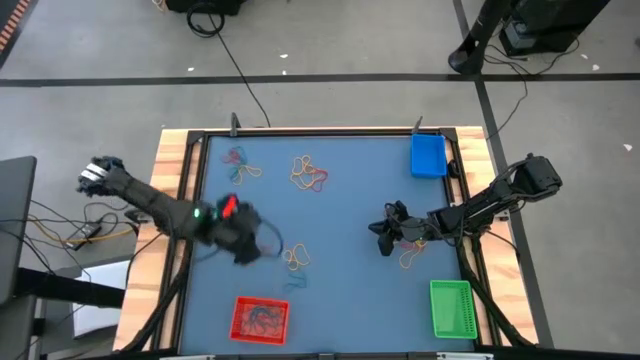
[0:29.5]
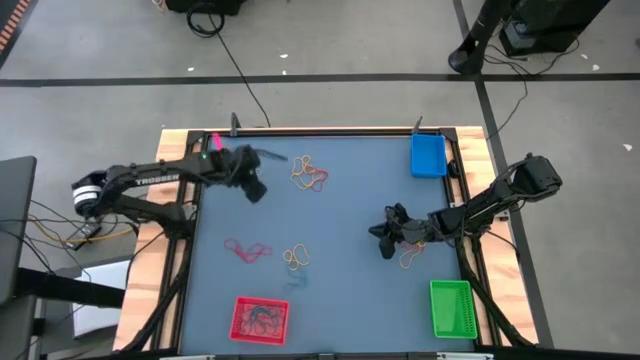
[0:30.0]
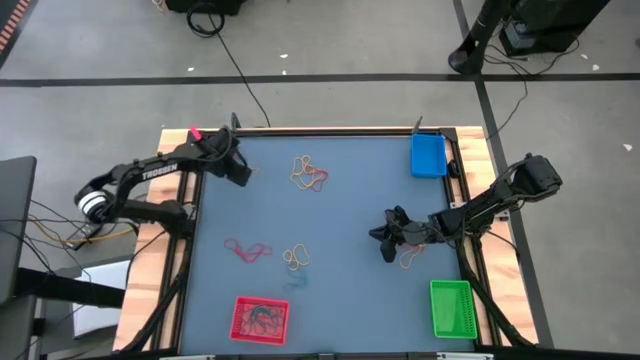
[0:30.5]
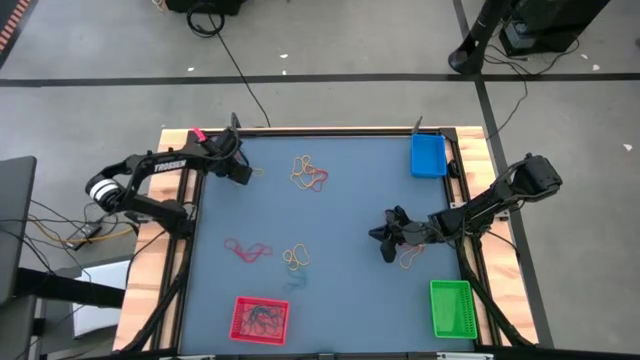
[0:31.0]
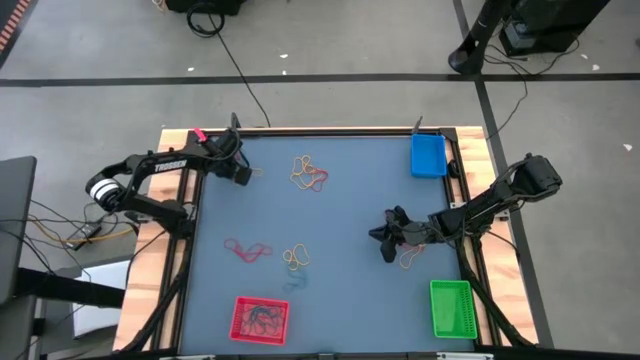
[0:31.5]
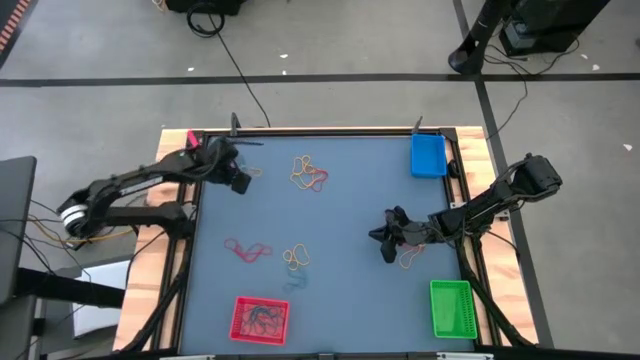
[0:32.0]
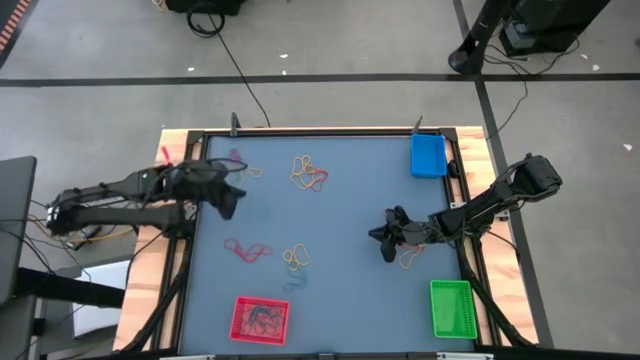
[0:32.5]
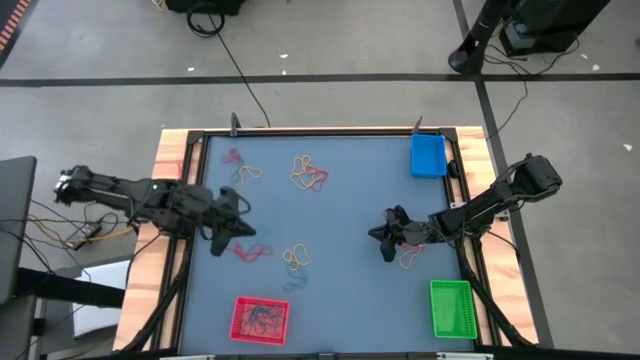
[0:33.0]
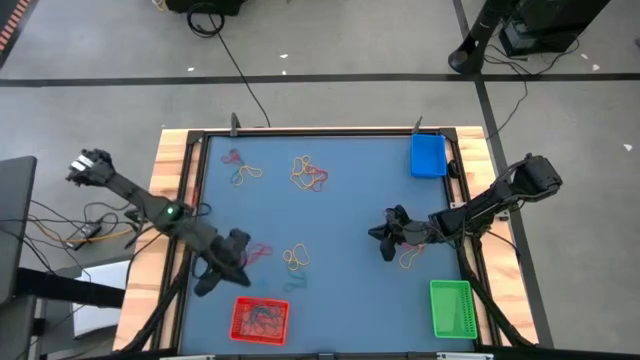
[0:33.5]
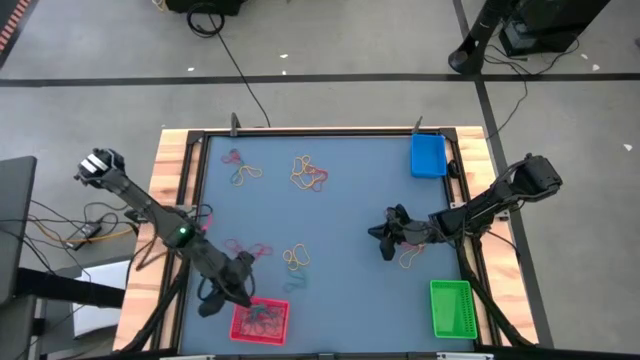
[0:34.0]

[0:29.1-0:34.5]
Task: Sort rubber bands into baskets
Put the blue rubber band into the red bin

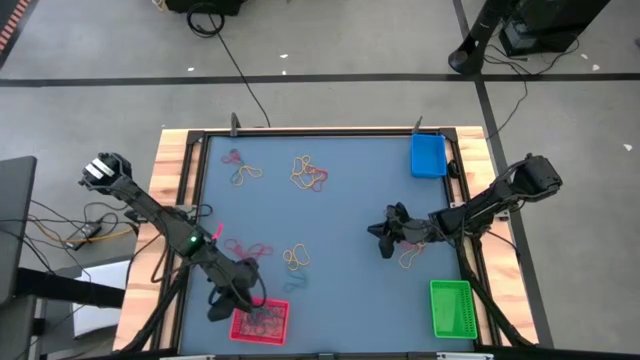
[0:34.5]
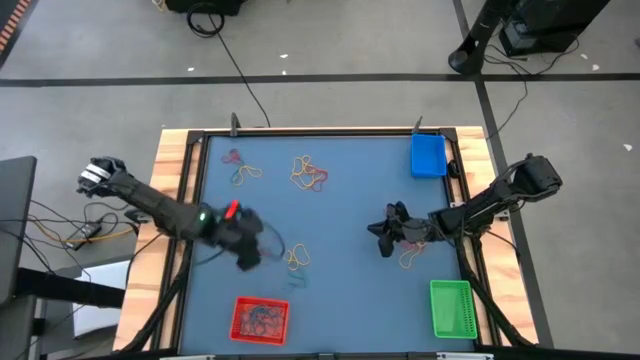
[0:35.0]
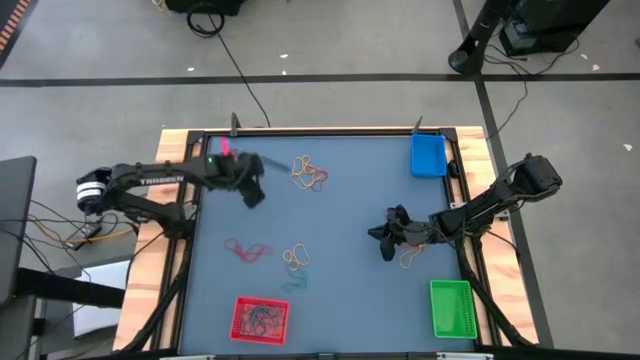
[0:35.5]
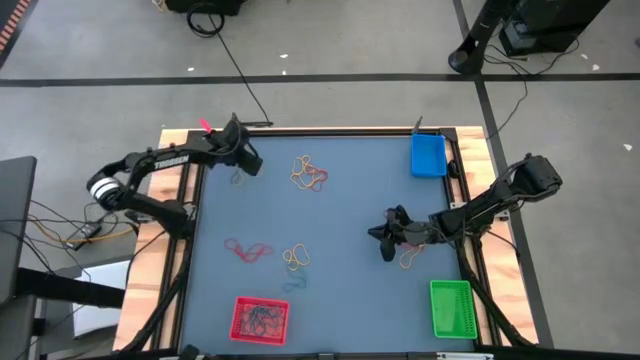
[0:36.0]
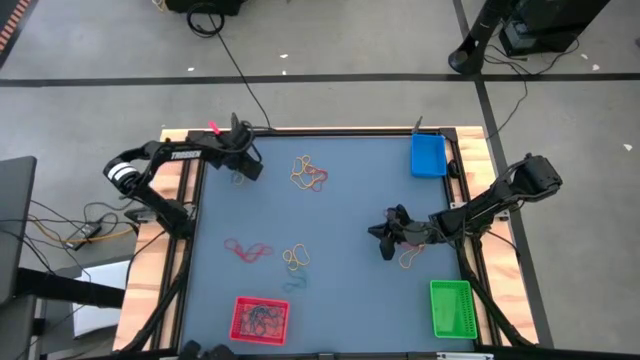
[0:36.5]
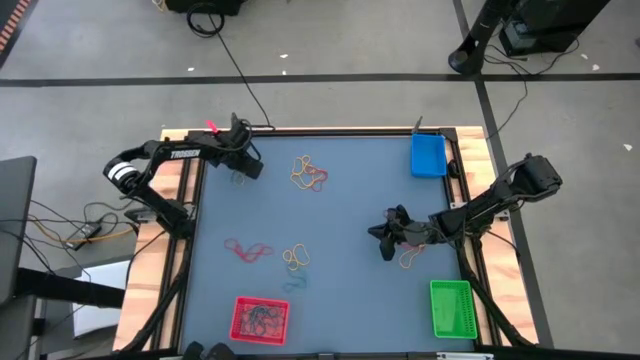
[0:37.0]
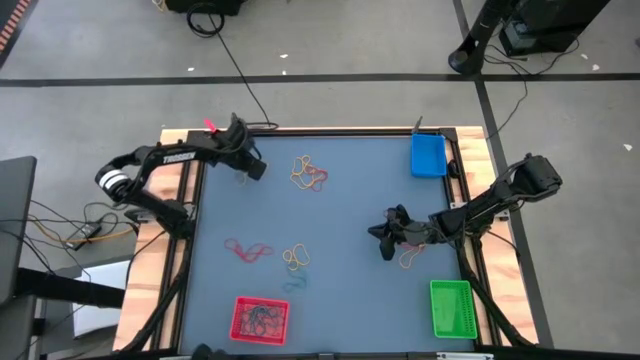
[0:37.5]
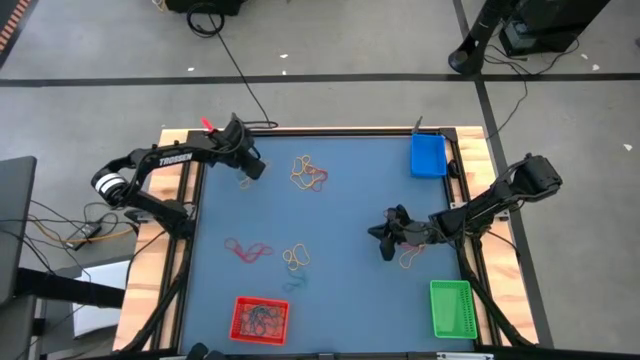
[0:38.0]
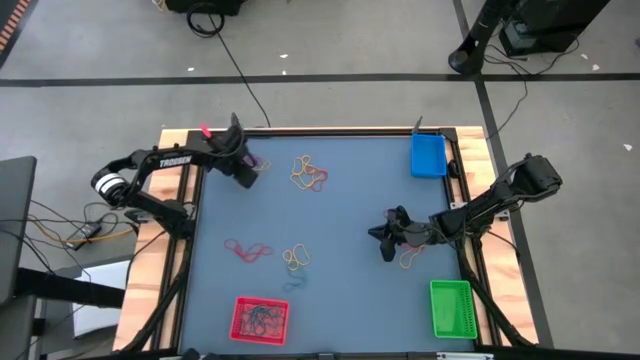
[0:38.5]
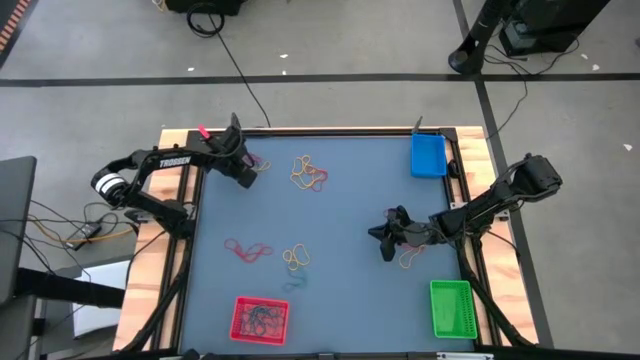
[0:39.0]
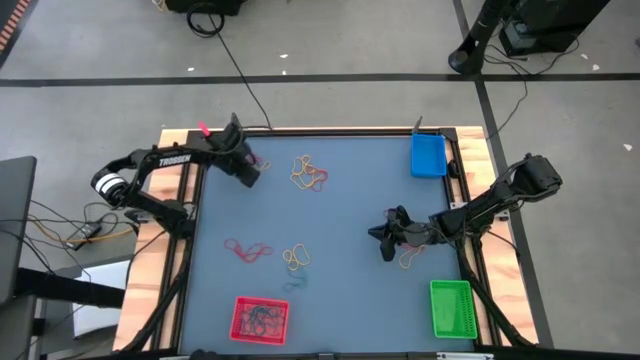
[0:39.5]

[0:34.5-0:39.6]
Put the blue rubber band into the red bin

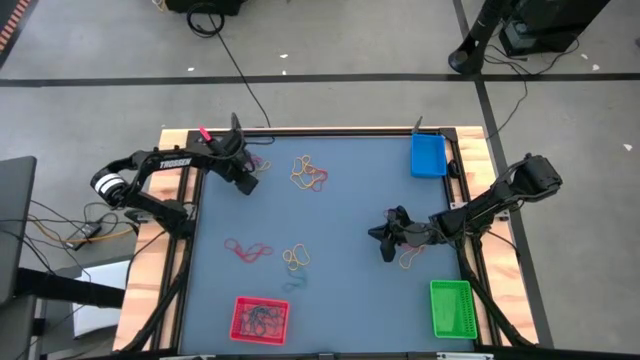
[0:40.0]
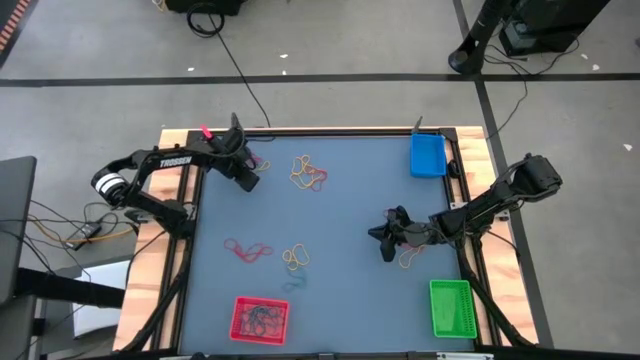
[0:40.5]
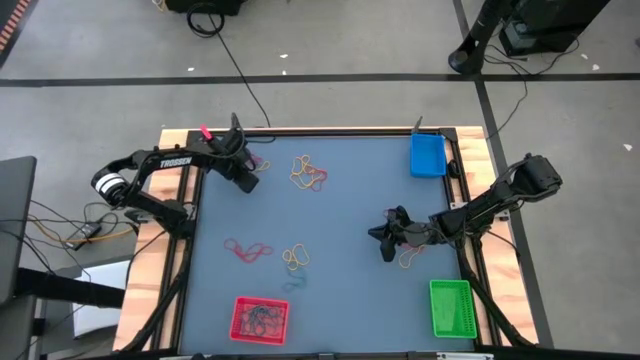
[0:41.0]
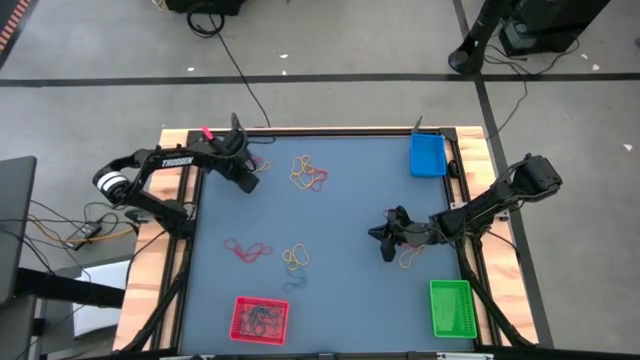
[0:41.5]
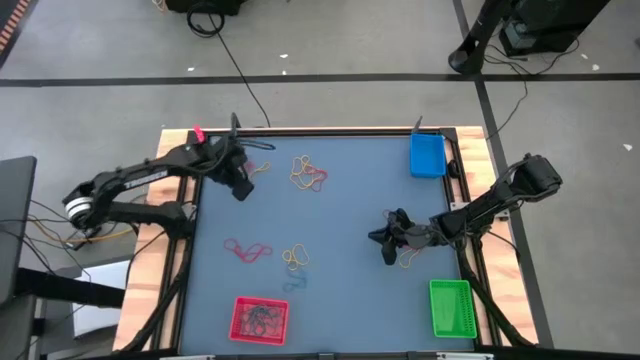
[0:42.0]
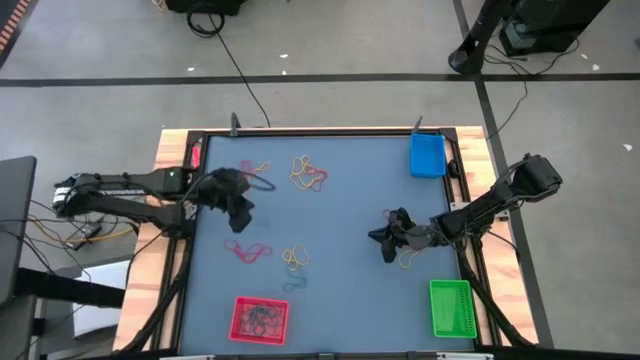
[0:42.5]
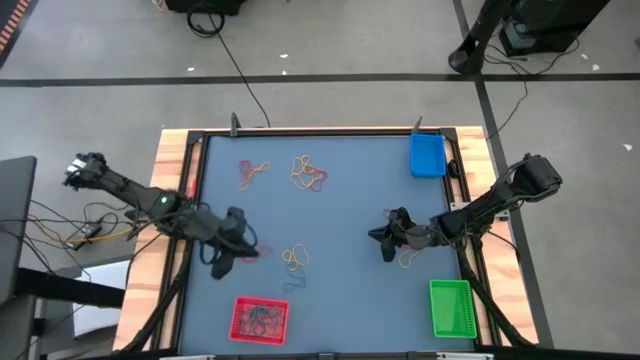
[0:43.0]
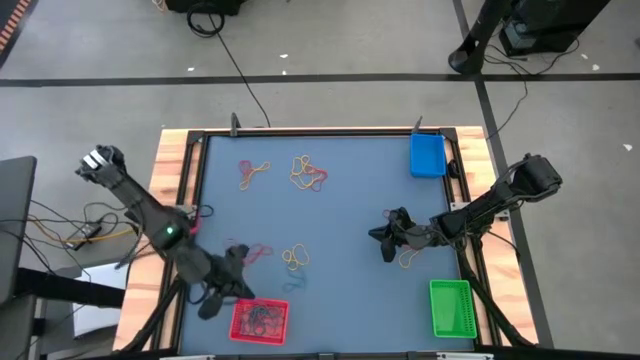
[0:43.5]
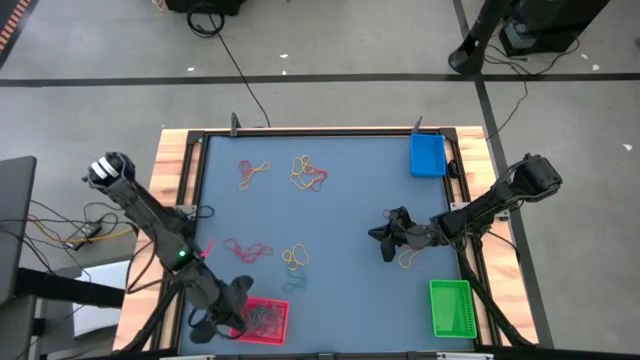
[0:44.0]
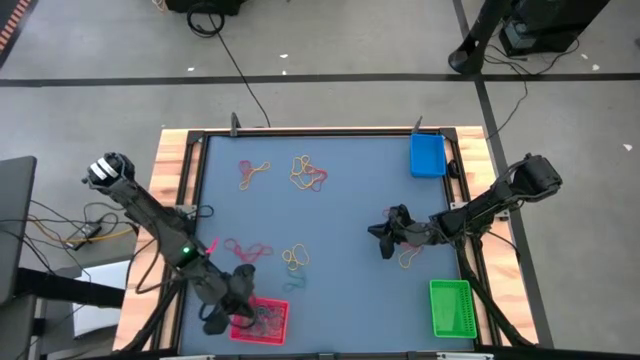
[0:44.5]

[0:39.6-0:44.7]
Put the blue rubber band into the red bin

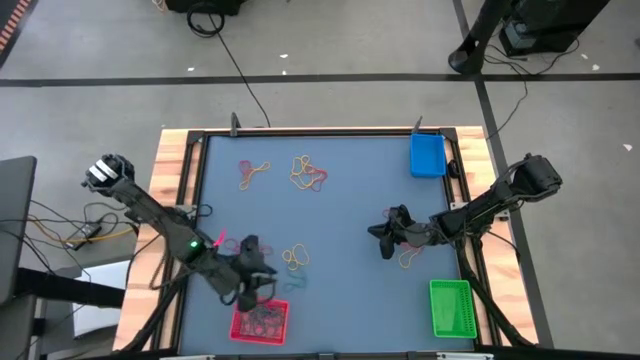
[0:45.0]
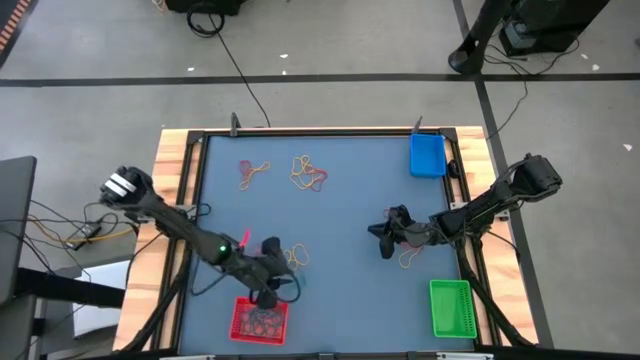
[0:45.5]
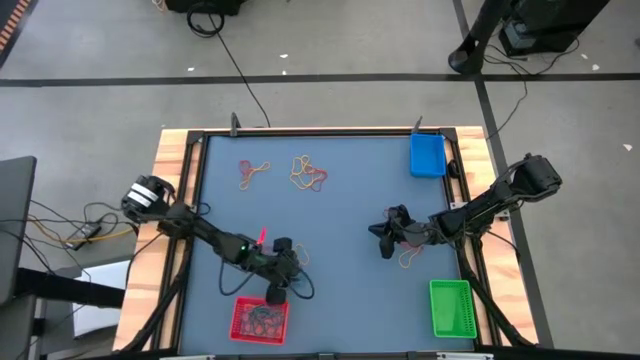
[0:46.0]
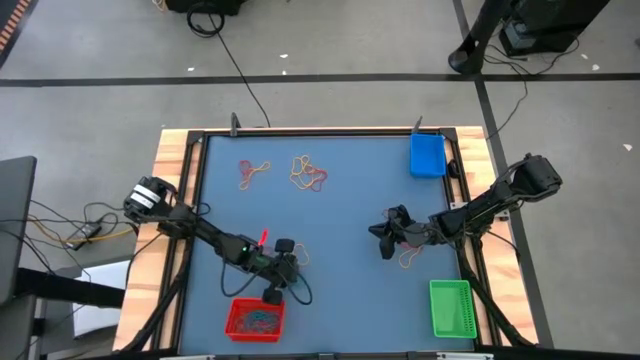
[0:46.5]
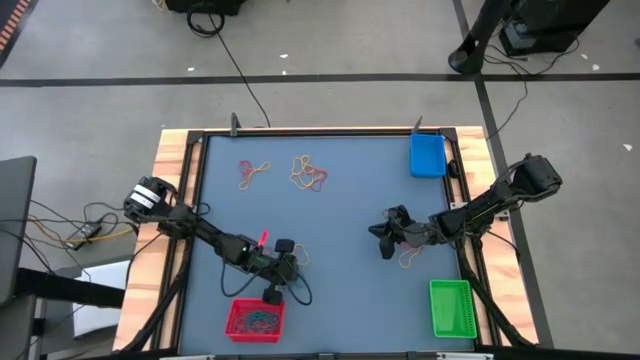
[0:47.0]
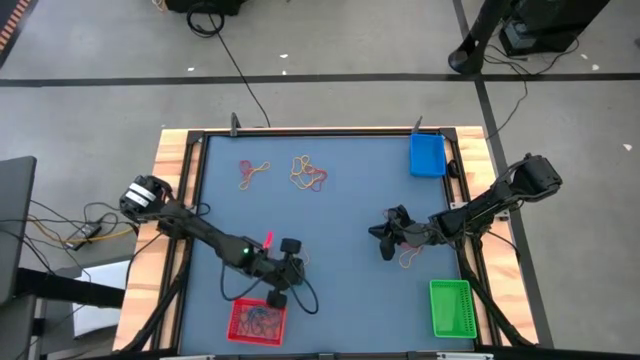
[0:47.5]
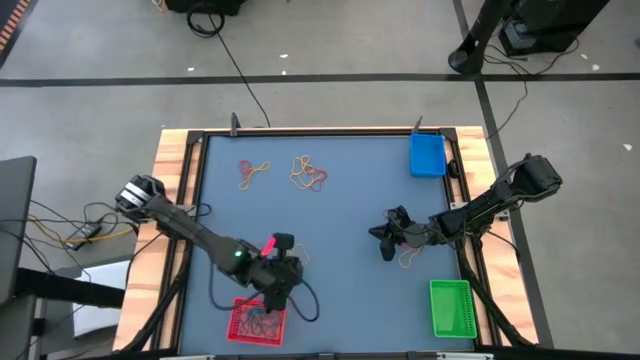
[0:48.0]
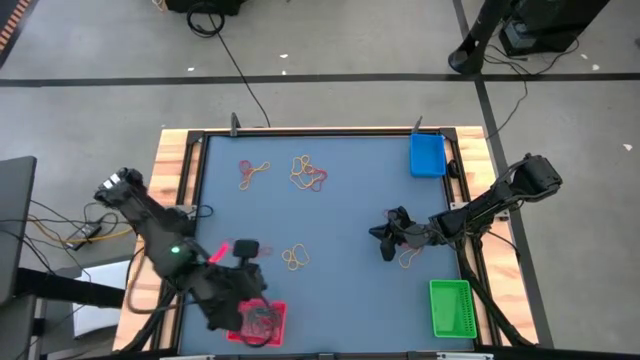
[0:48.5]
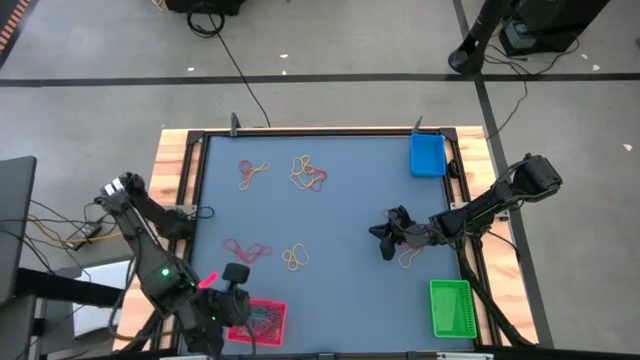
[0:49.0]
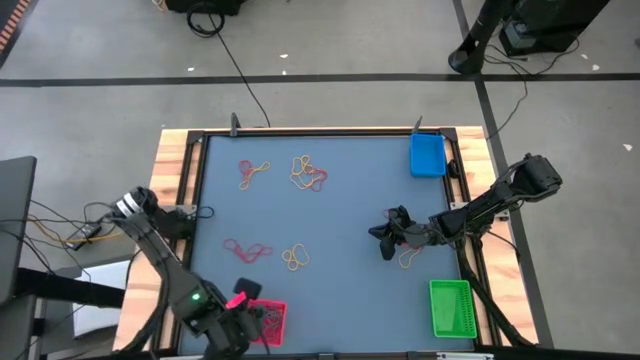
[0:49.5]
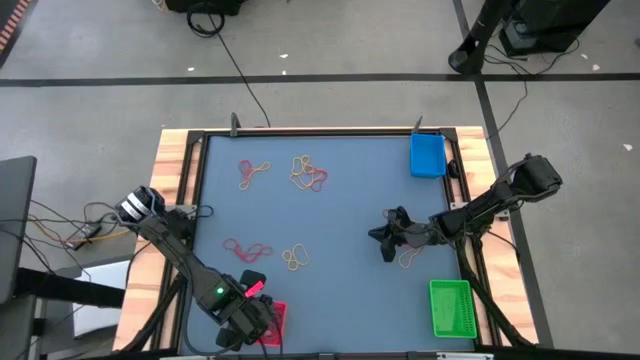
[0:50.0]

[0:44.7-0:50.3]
Put the blue rubber band into the red bin
